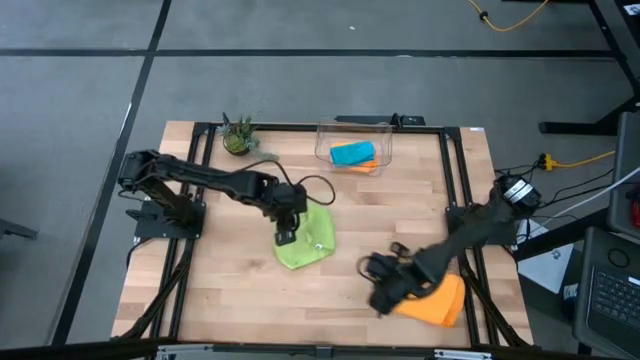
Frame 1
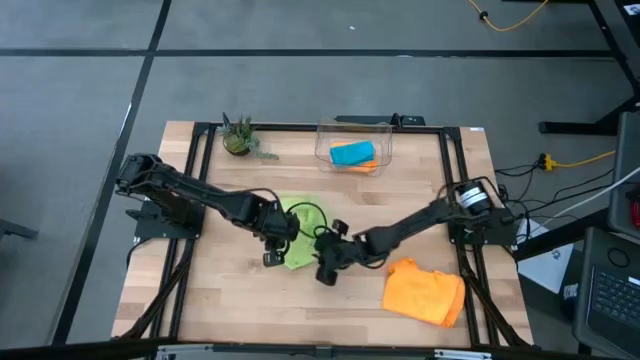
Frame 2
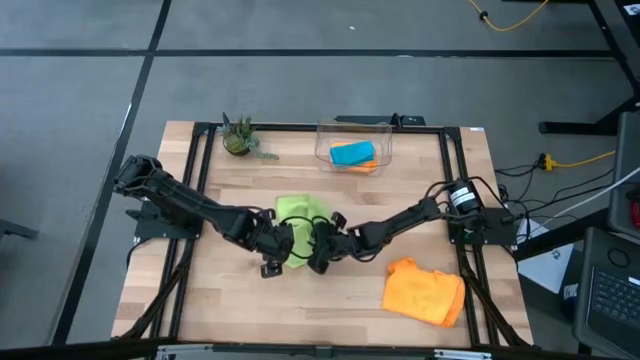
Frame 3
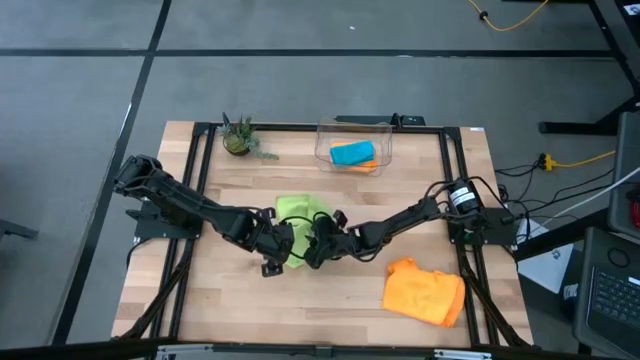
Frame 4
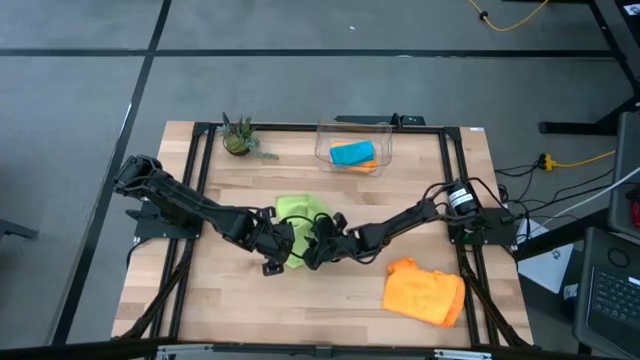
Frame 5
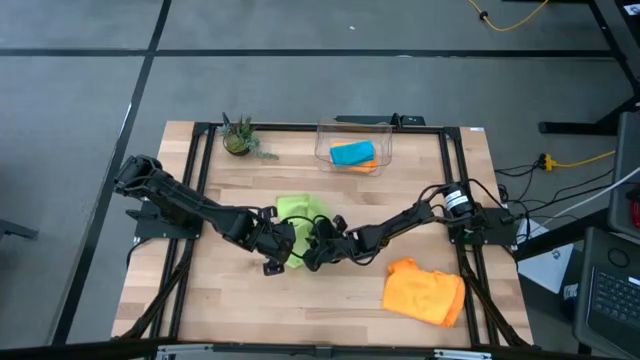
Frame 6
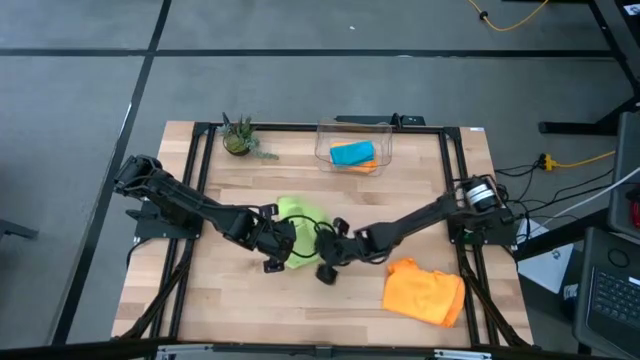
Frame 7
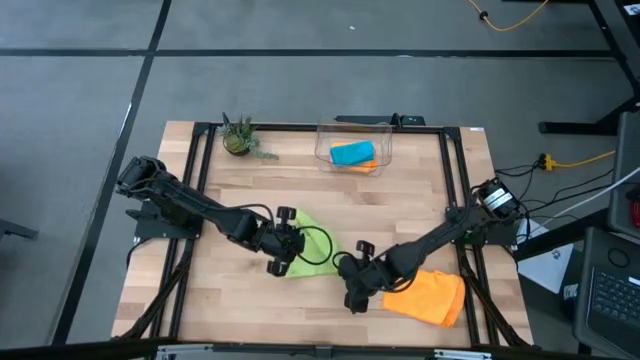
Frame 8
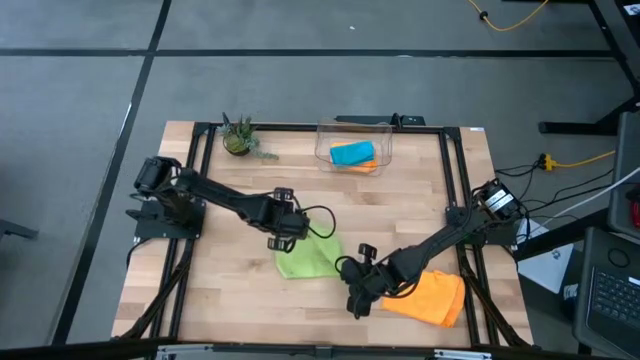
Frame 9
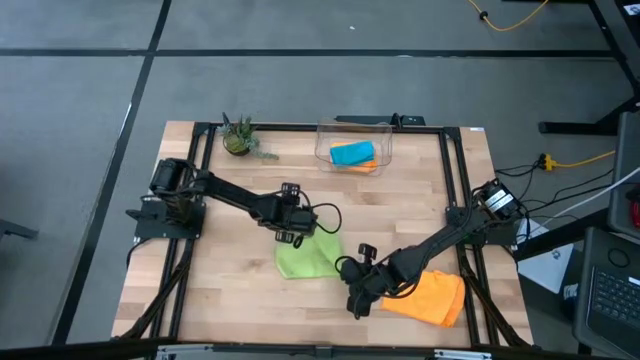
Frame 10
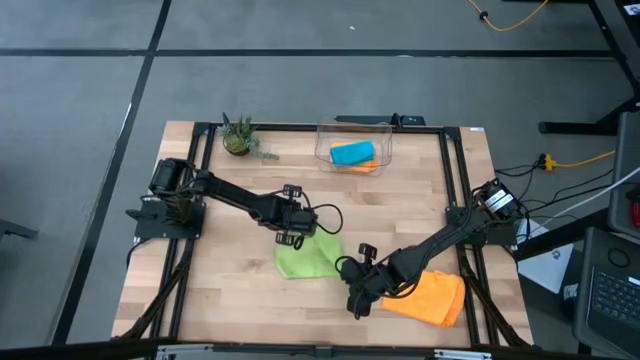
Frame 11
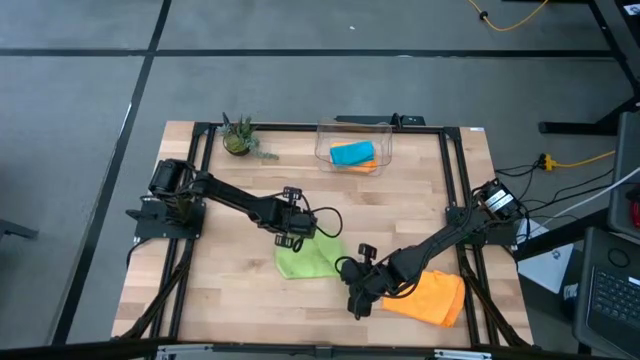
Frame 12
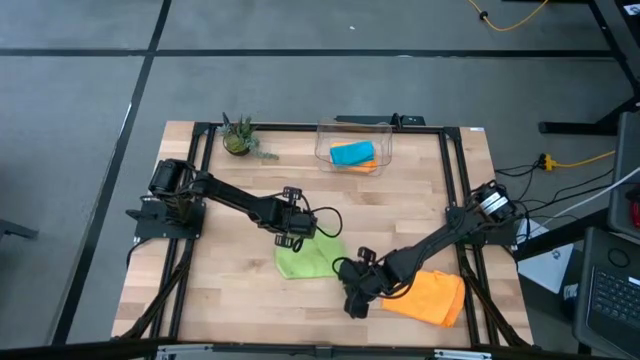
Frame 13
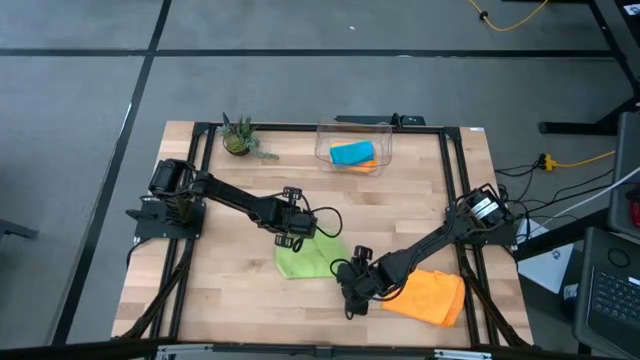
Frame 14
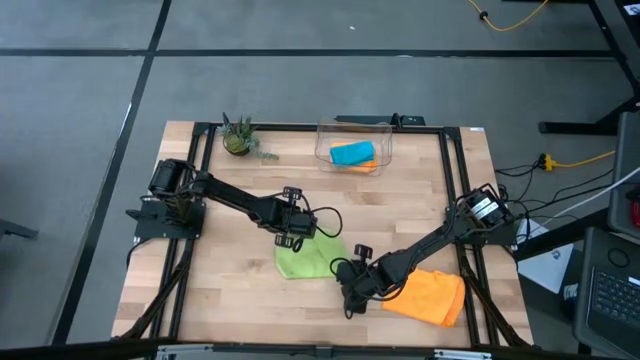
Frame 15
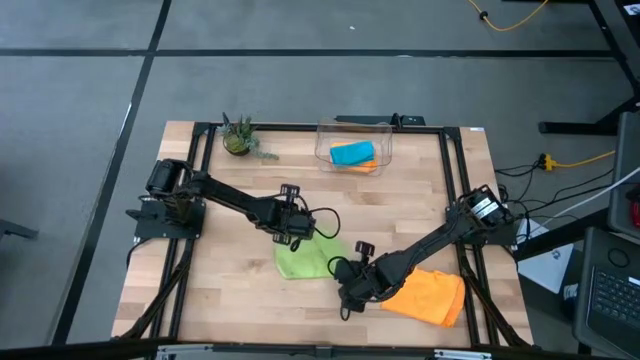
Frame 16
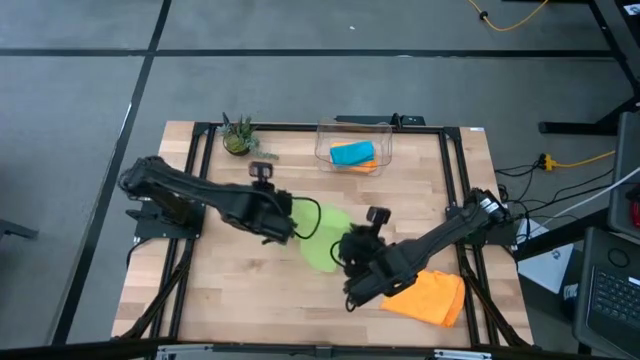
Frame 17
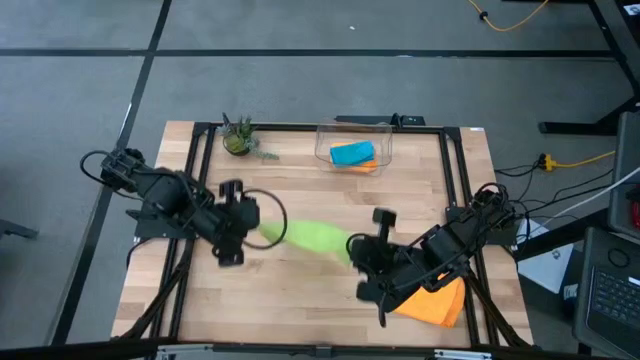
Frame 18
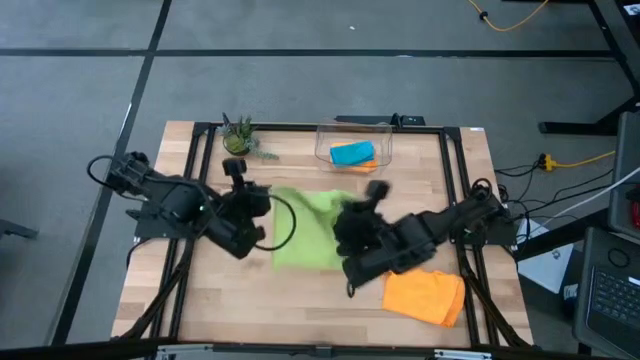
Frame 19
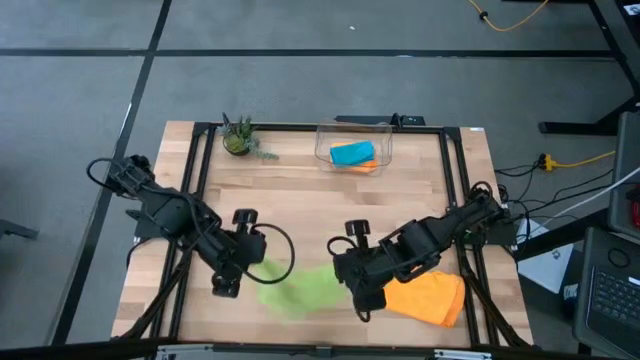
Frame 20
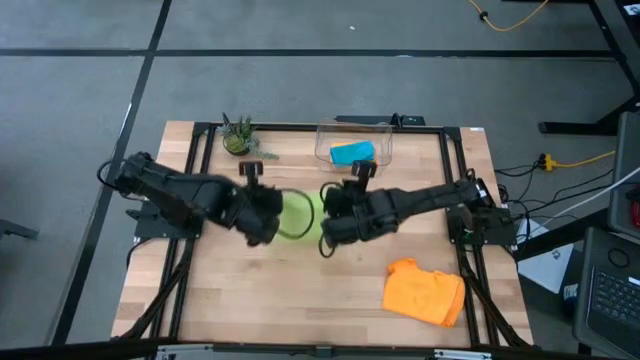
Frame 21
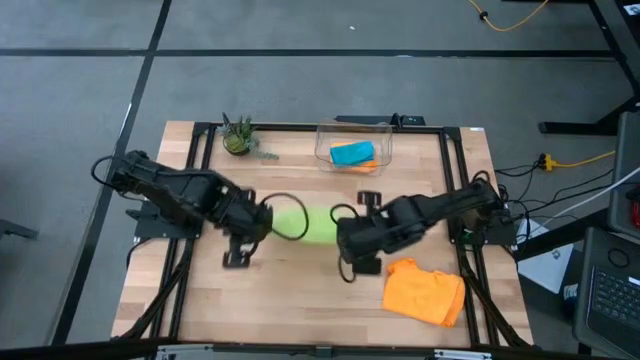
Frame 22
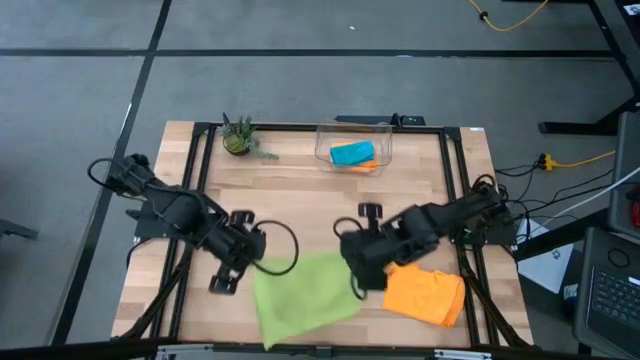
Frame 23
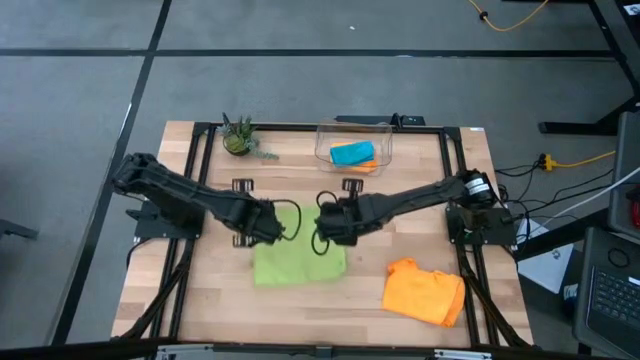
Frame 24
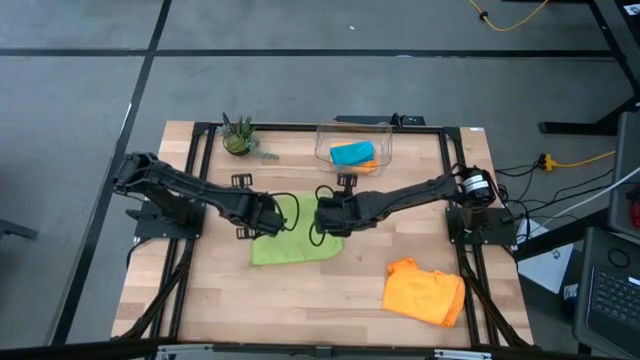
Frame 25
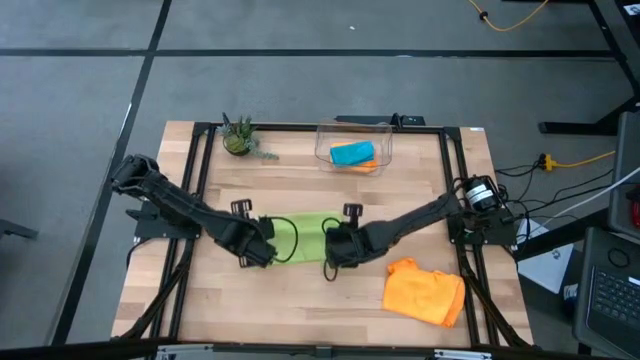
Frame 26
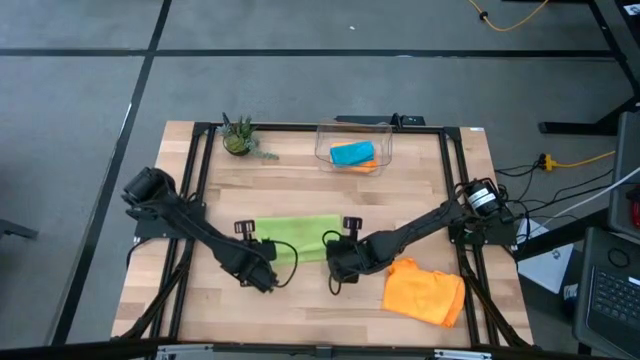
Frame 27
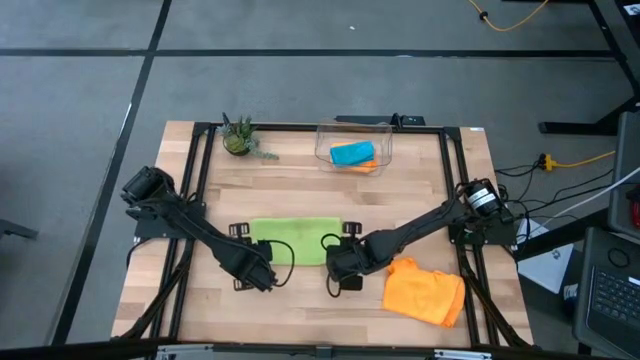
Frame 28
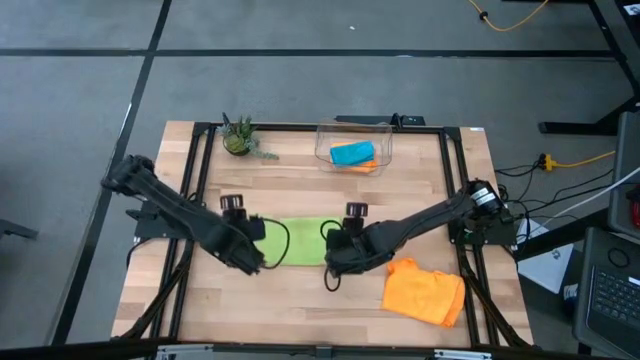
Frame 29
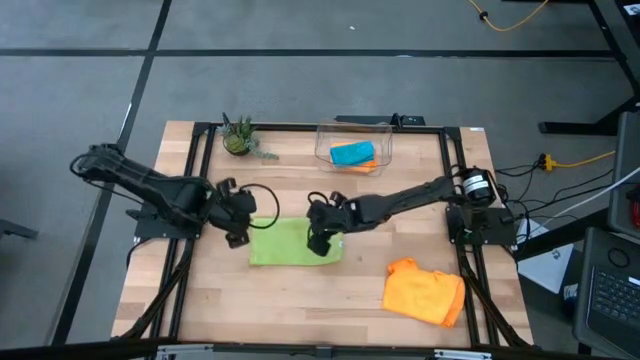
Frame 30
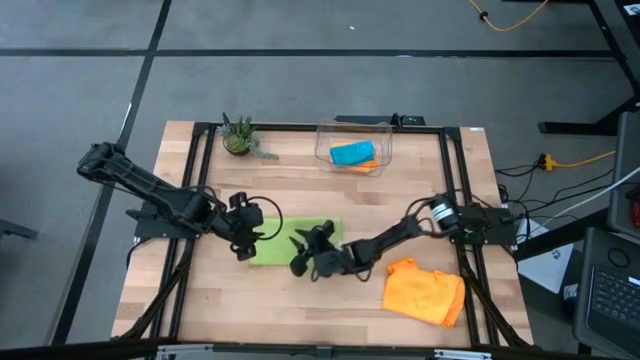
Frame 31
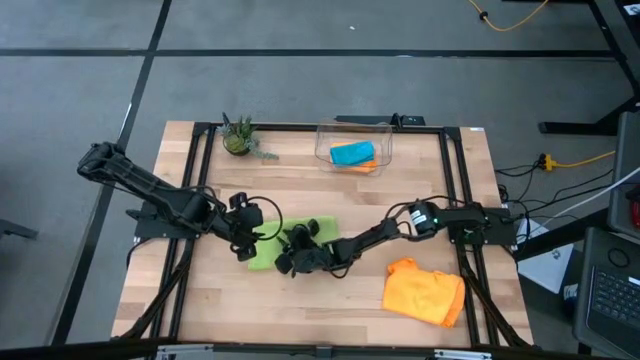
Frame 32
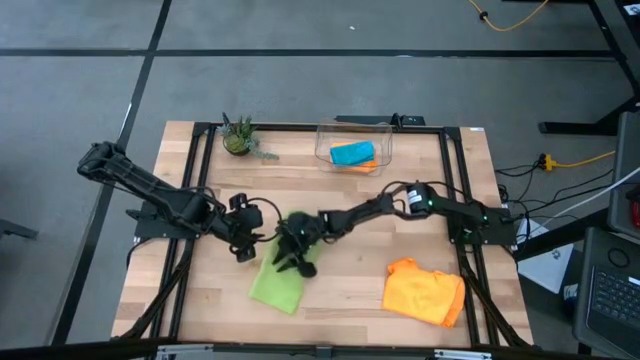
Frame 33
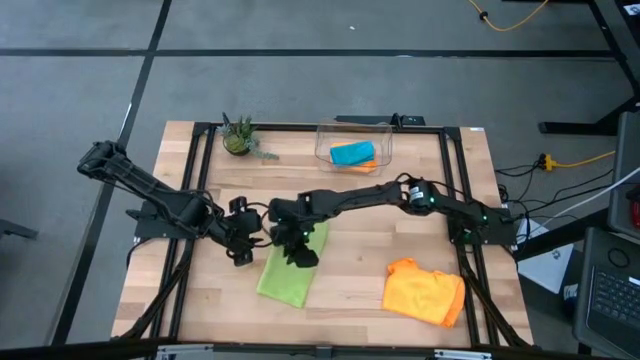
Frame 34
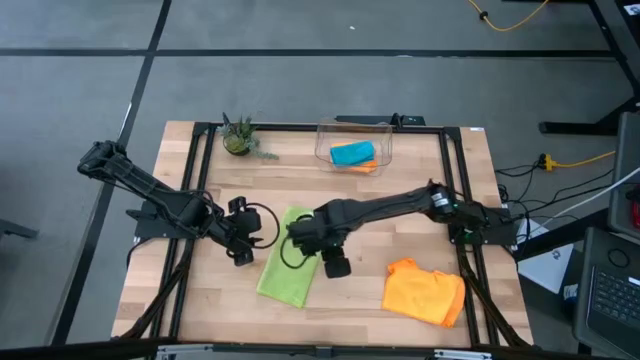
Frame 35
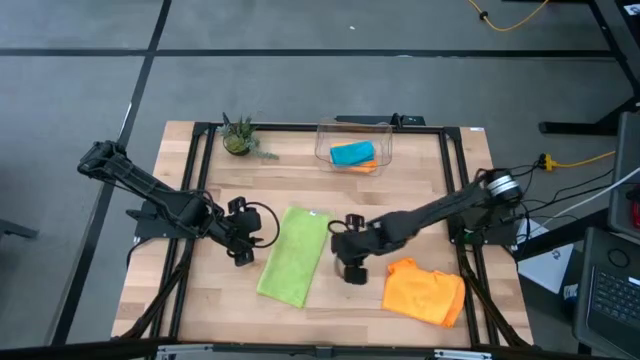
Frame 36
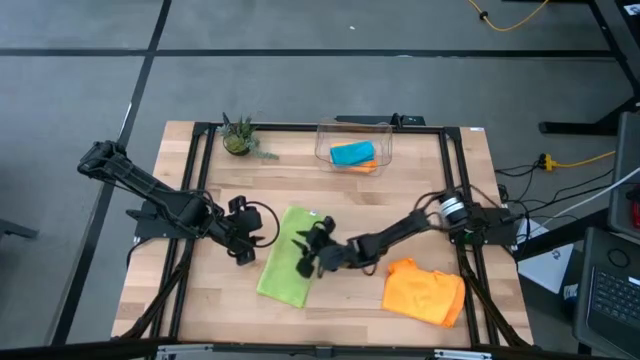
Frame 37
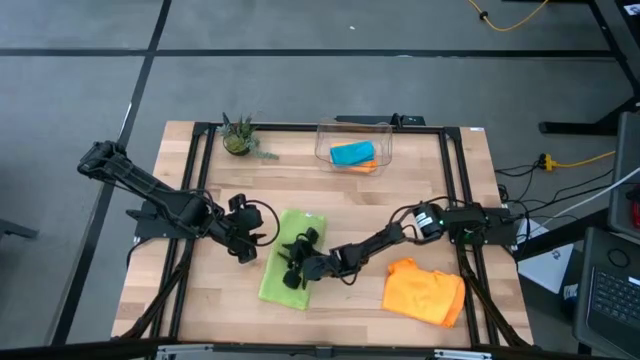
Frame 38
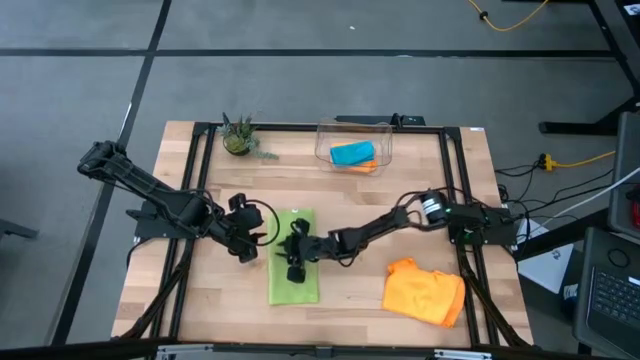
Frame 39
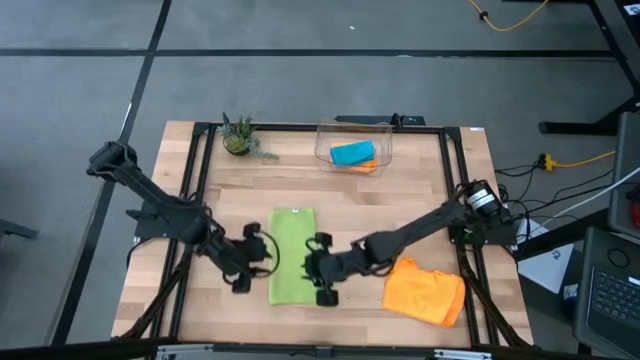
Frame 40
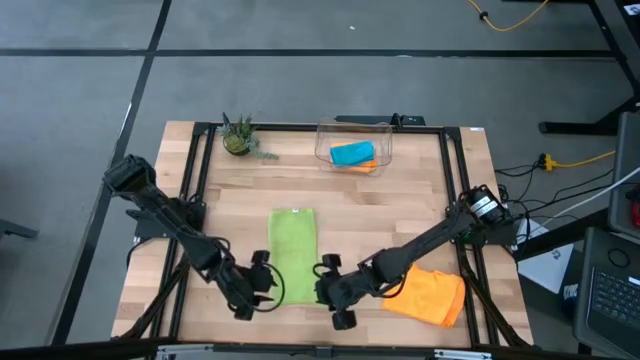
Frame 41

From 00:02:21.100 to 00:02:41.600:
Task: Fold microfiber towels
Fold the green towel on the table

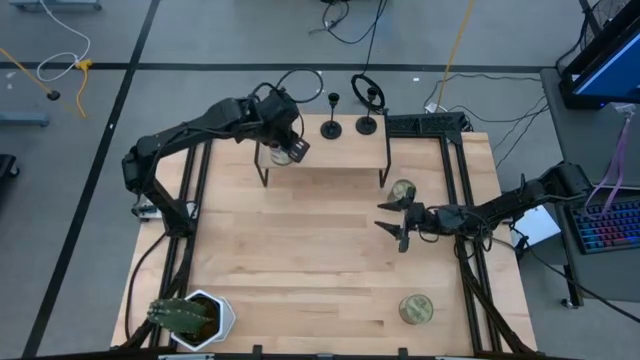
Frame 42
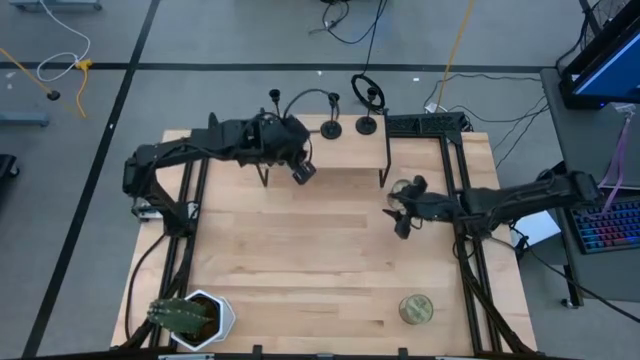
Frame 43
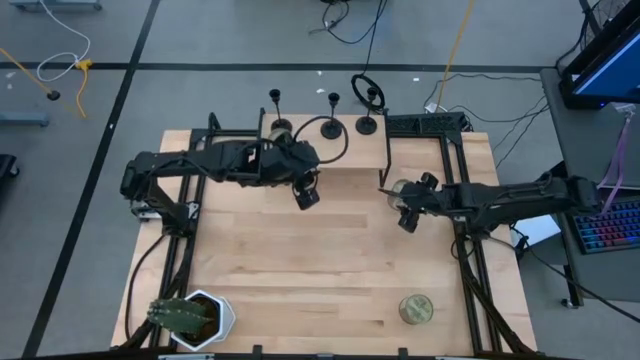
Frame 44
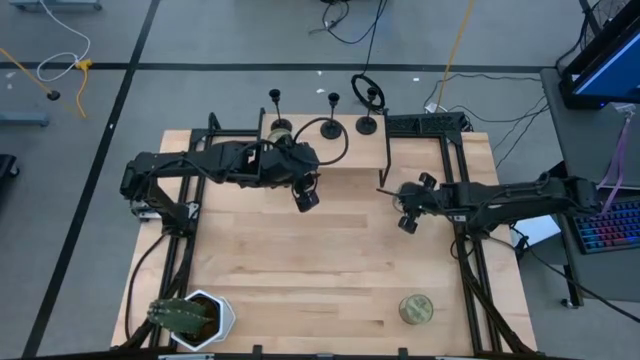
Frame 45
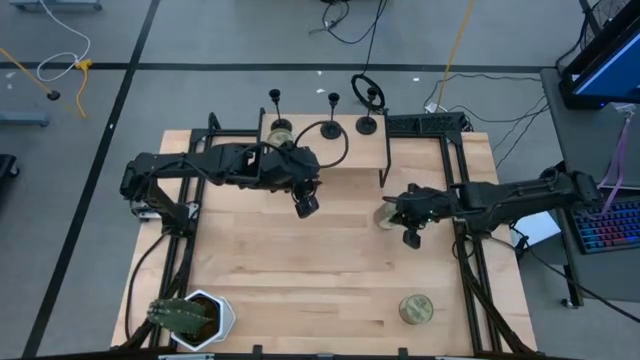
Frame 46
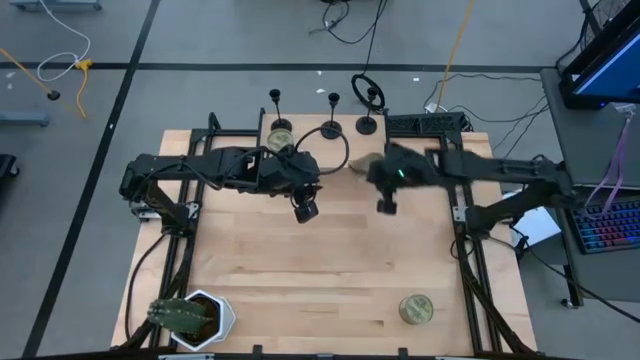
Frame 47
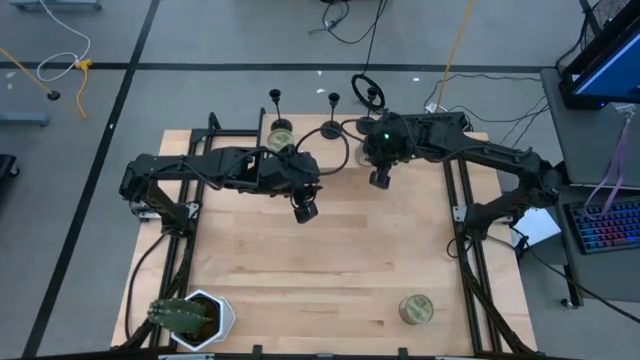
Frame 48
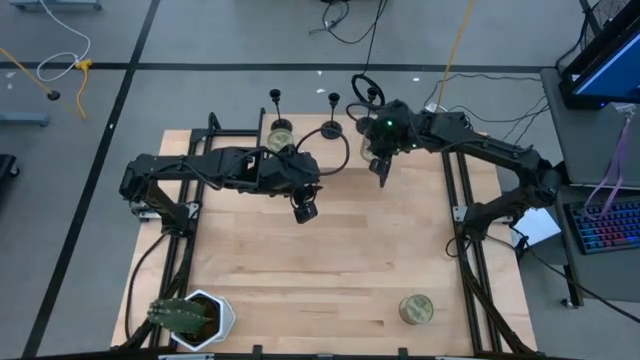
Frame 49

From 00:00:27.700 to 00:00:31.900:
Task: Pick & Place candle stick holders
Put the top scented candle on the shelf
